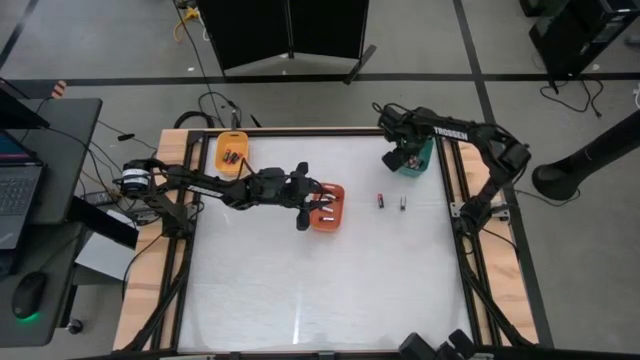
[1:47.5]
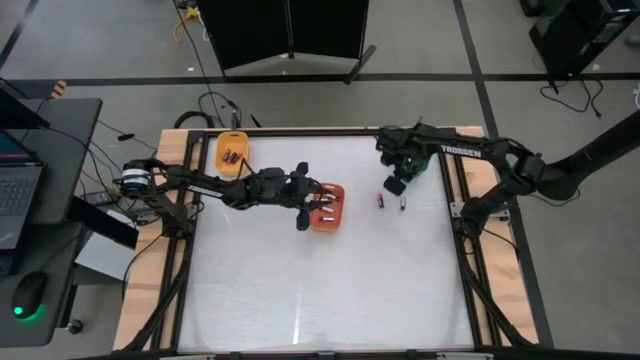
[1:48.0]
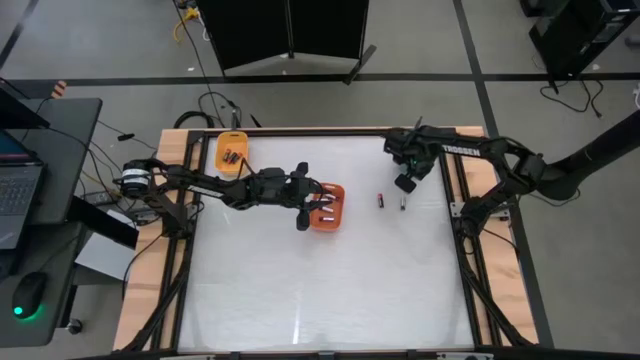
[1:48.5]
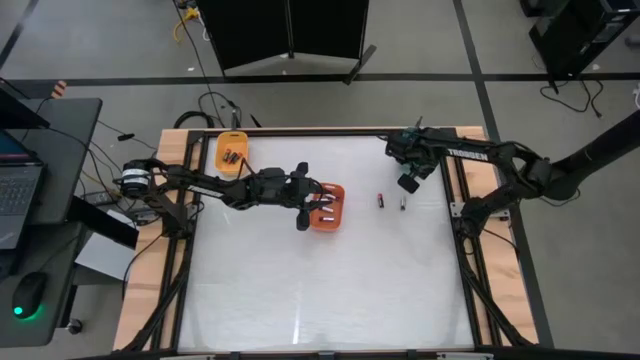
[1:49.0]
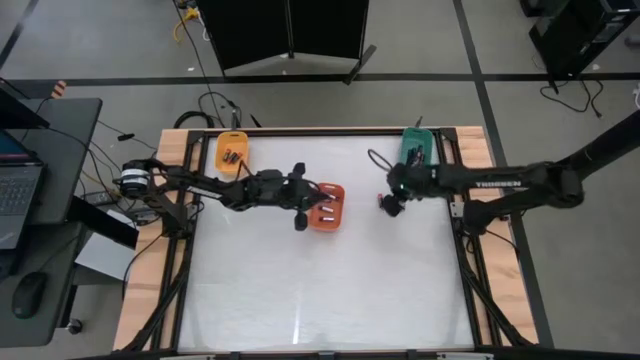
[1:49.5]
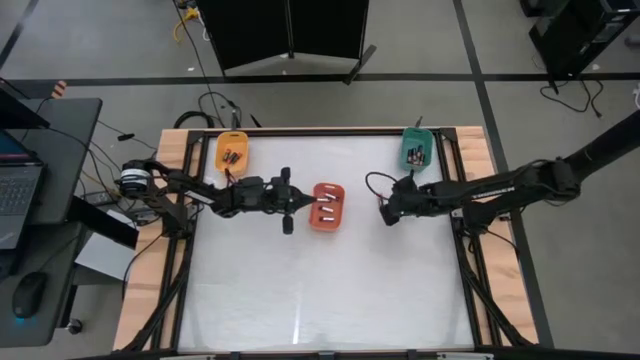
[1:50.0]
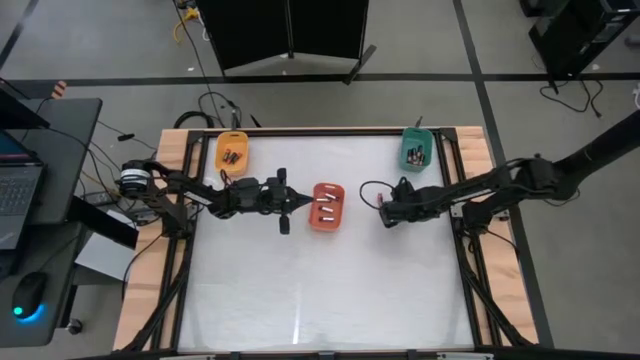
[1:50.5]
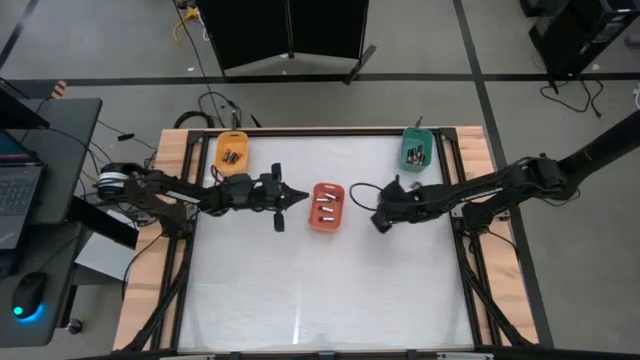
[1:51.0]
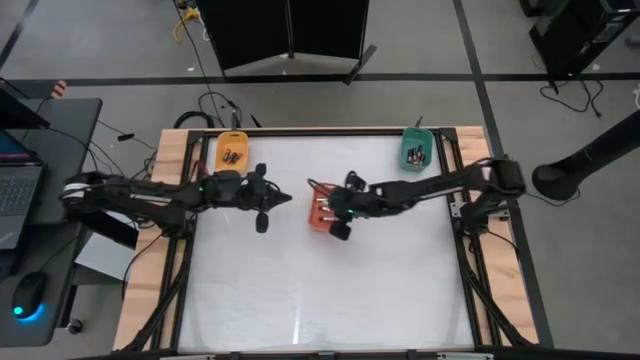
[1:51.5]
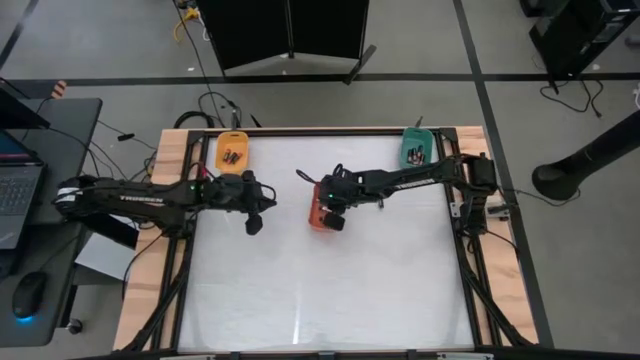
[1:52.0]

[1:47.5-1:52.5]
Task: Sort batteries
Put the silver battery into the orange bin

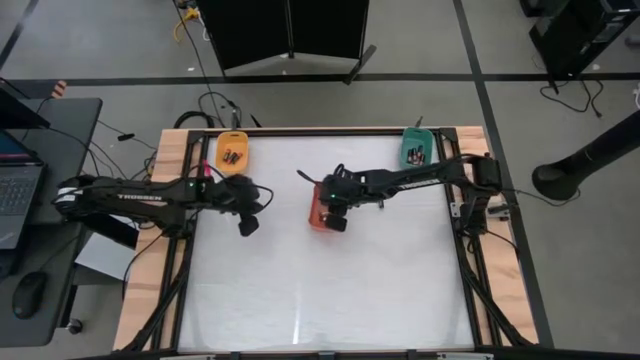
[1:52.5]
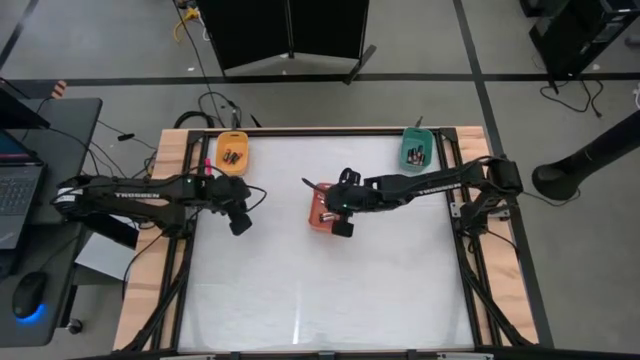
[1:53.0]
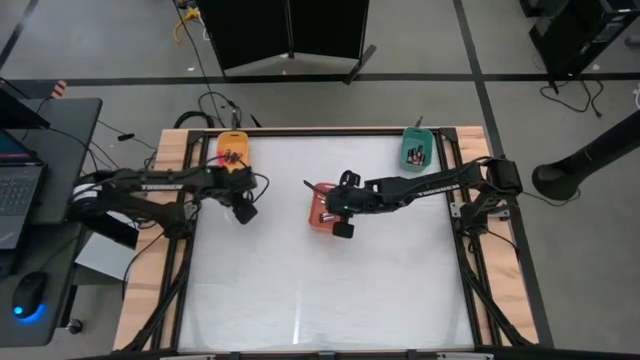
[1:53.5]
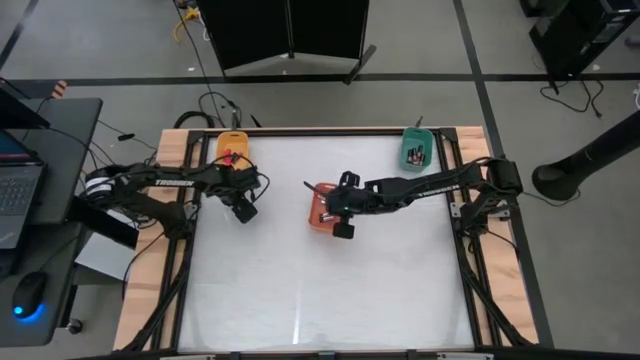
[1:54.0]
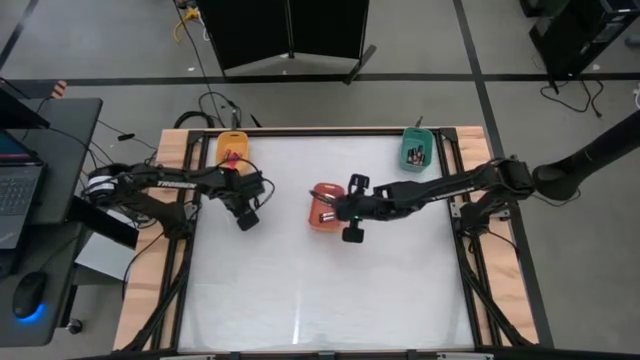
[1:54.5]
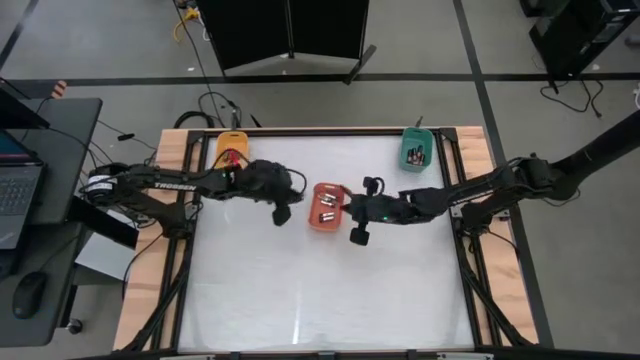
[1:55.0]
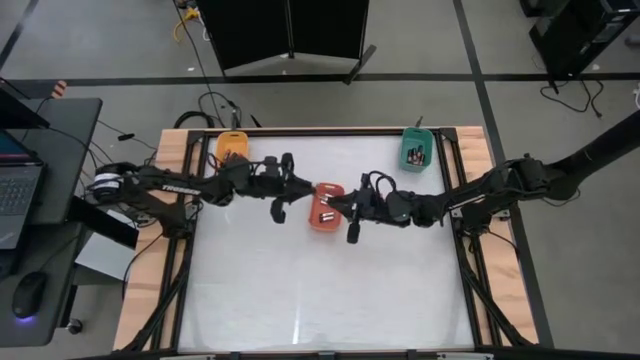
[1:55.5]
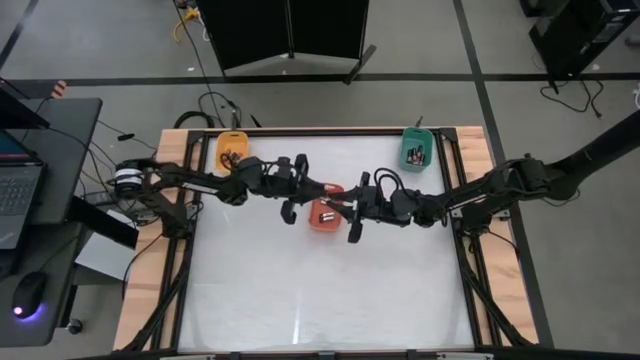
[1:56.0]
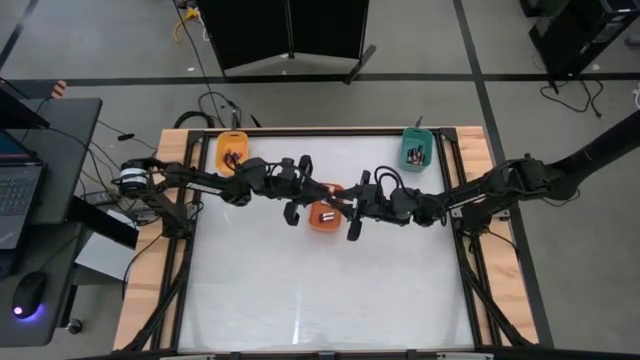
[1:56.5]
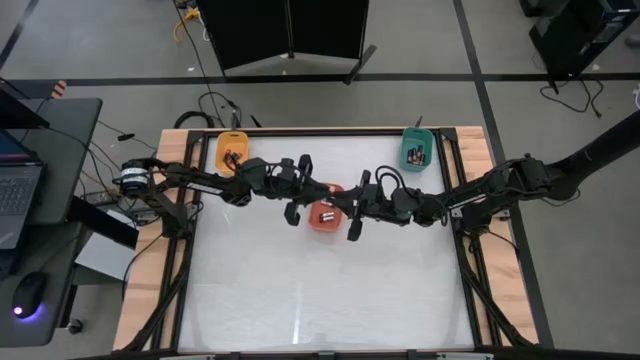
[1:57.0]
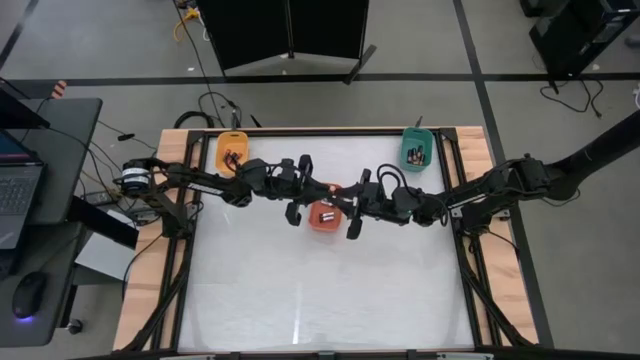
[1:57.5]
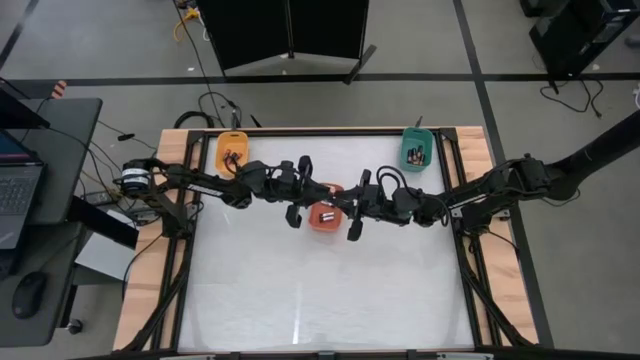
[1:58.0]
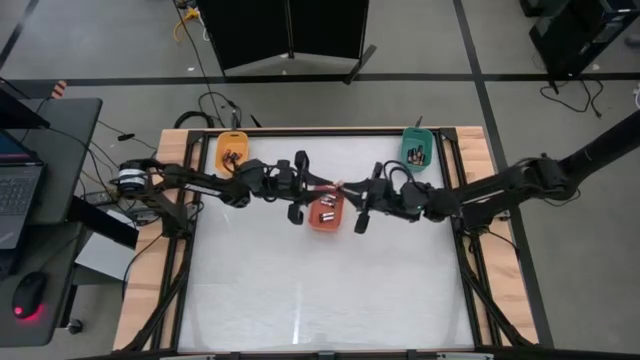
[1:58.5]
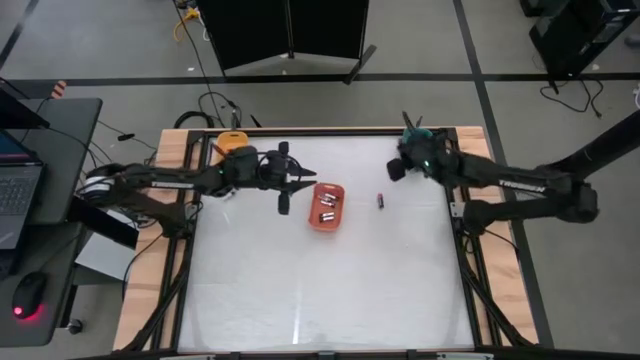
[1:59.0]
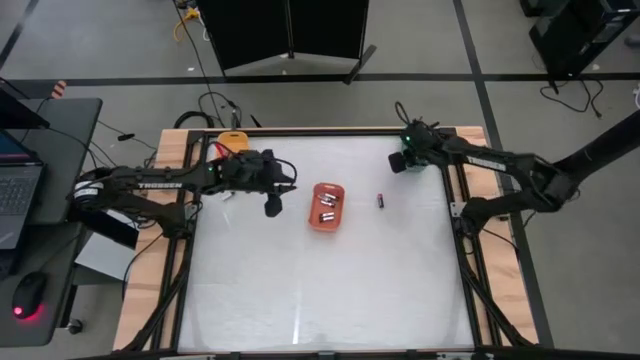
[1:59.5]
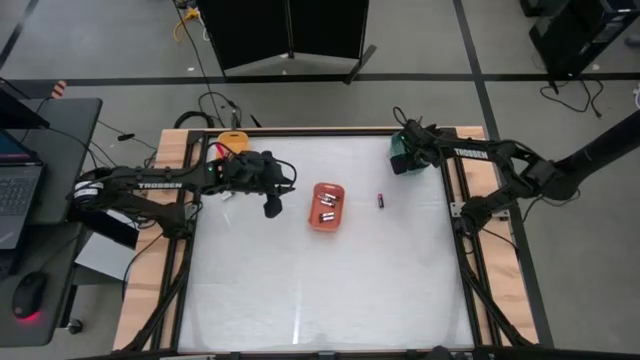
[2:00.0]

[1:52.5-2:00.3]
Put the black-brown battery into the green bin

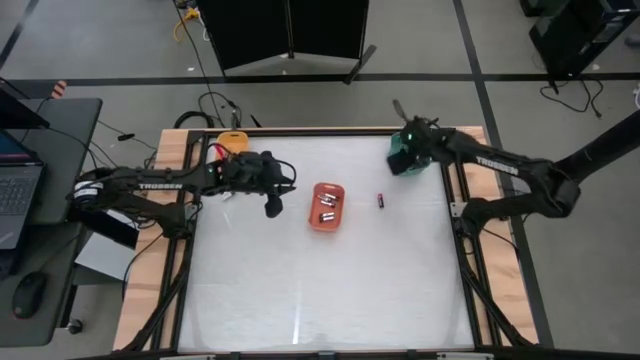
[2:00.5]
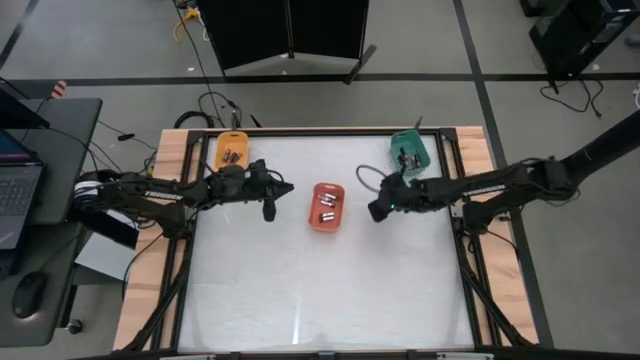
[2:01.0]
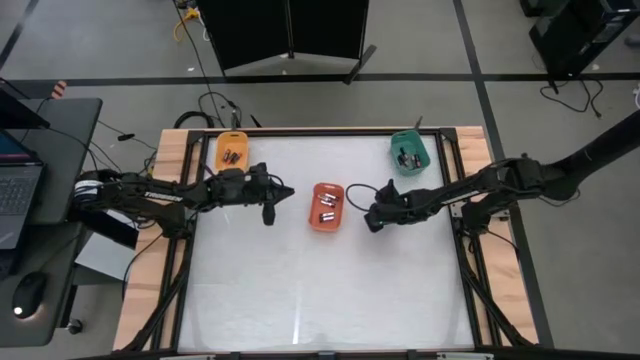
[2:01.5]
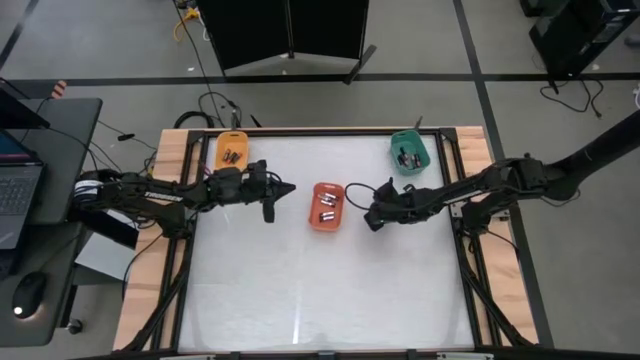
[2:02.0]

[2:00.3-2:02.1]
Put the black-red battery into the yellow bin

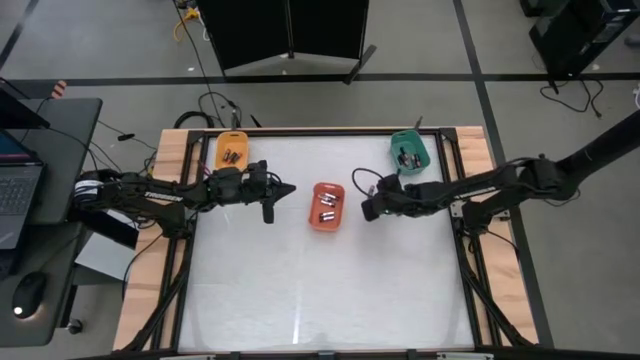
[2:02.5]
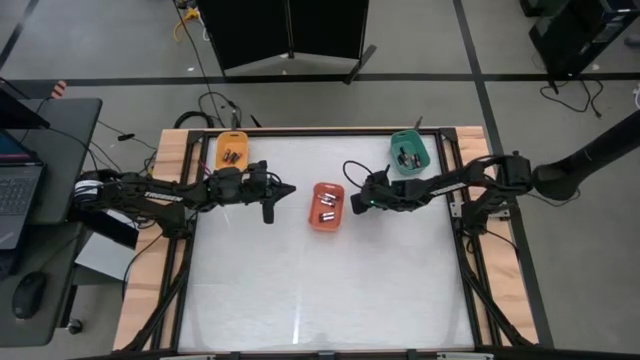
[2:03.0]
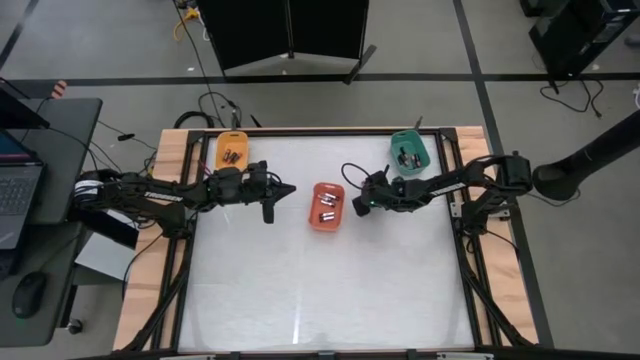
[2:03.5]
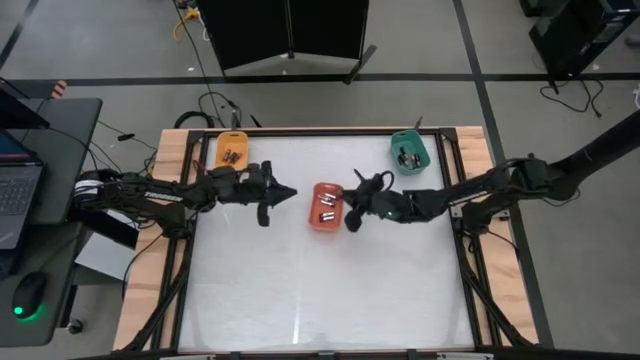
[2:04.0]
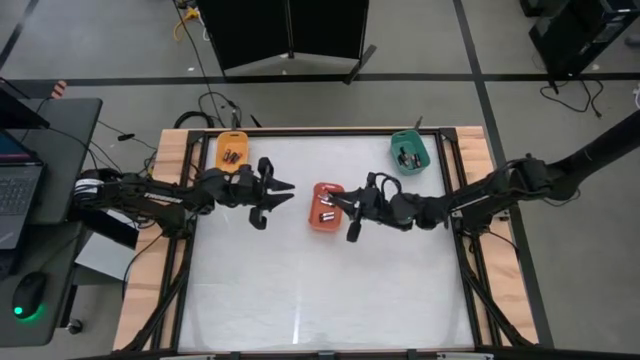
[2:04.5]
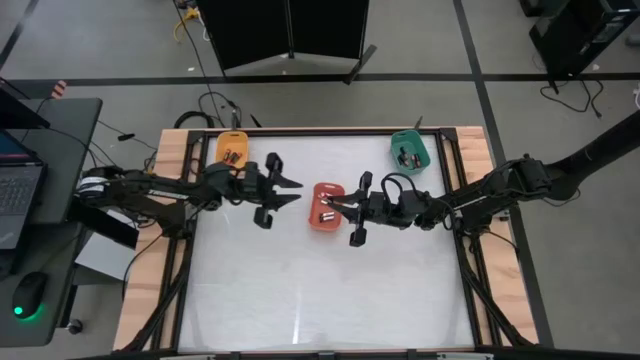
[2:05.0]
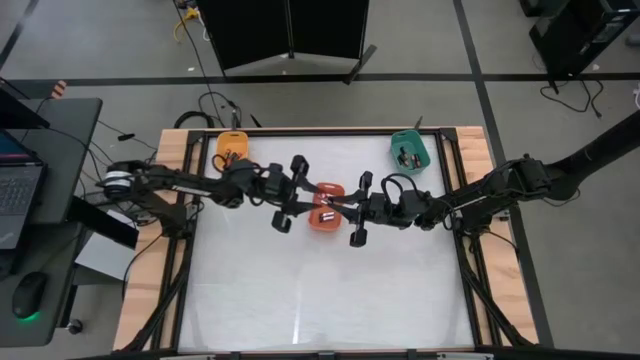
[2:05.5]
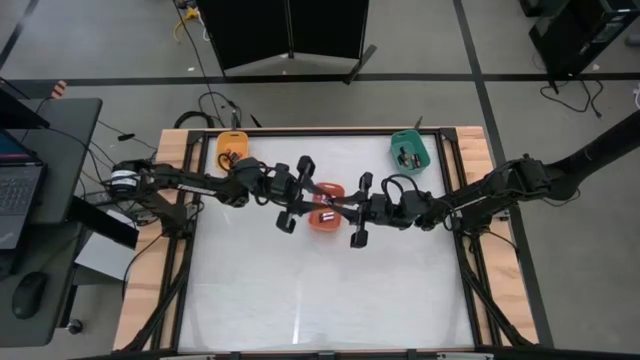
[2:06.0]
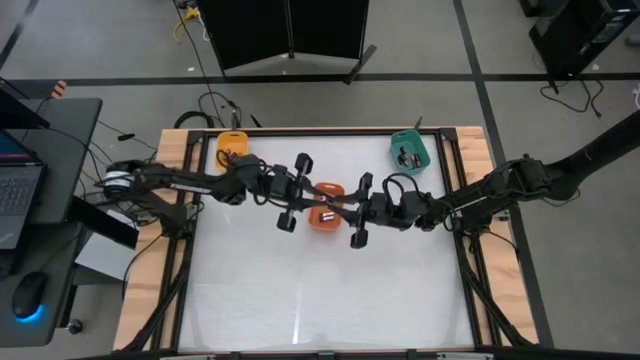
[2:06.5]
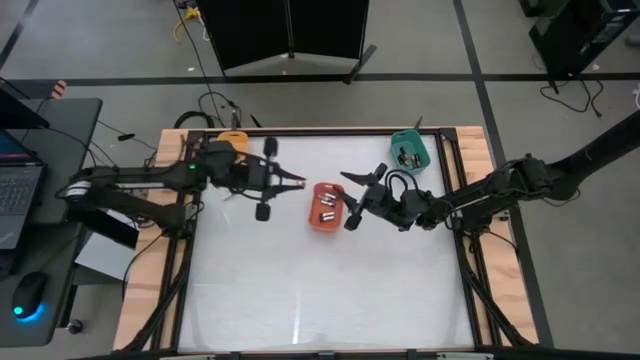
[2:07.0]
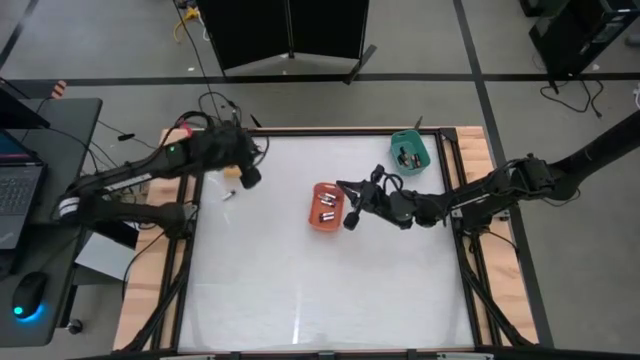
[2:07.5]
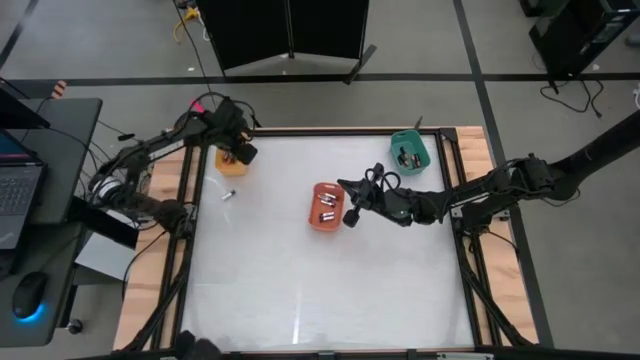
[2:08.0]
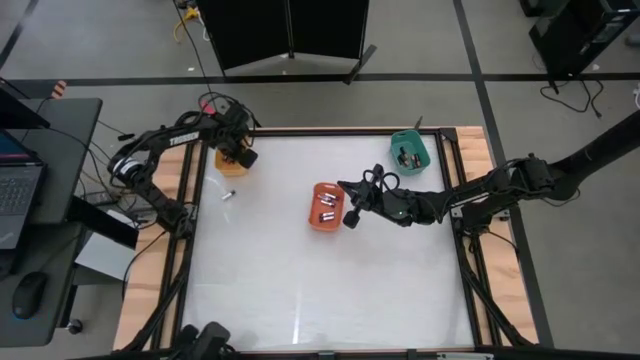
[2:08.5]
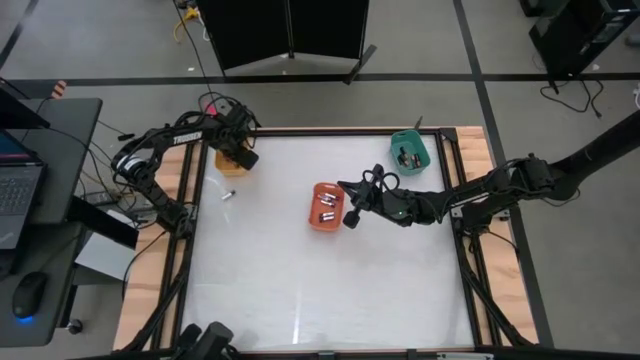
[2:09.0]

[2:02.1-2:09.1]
Put the black-red battery into the yellow bin
